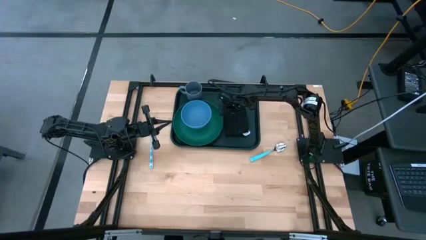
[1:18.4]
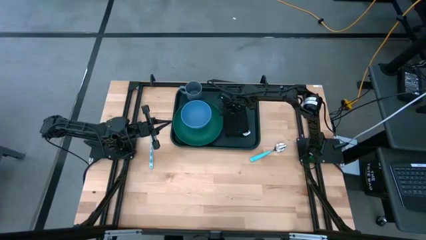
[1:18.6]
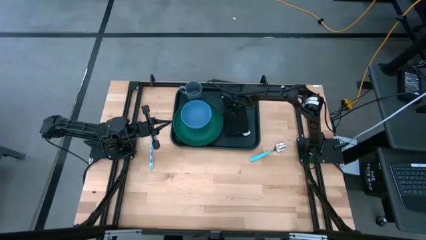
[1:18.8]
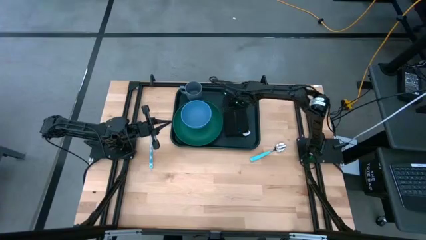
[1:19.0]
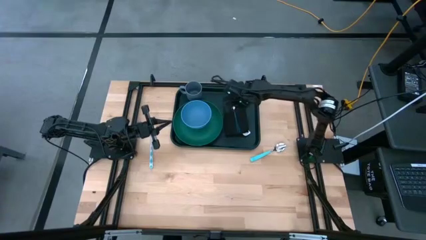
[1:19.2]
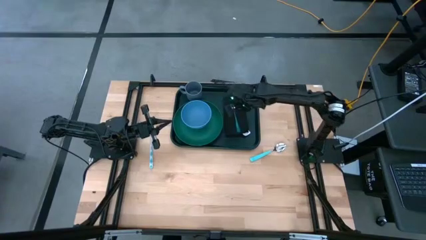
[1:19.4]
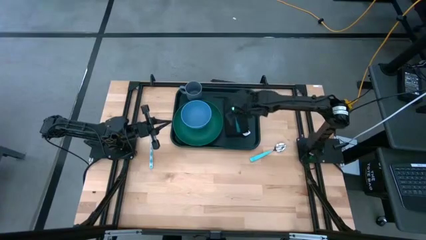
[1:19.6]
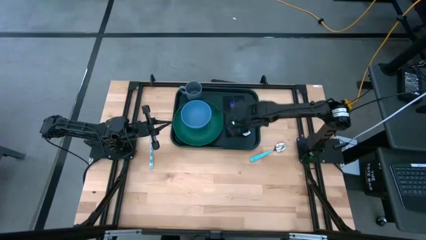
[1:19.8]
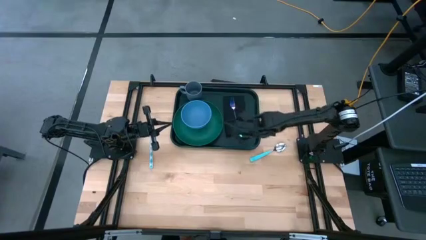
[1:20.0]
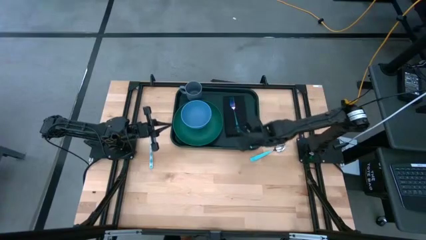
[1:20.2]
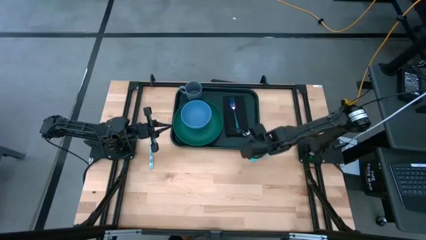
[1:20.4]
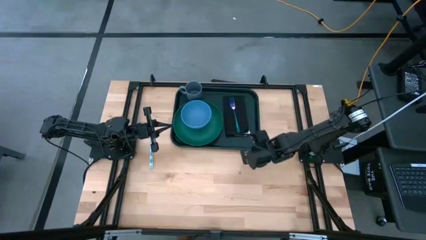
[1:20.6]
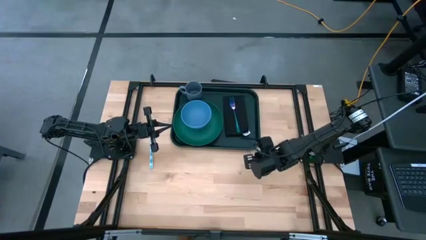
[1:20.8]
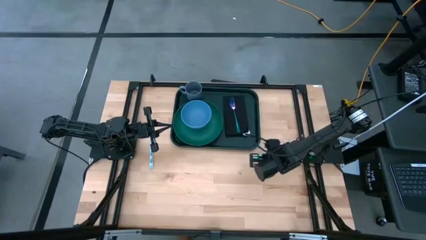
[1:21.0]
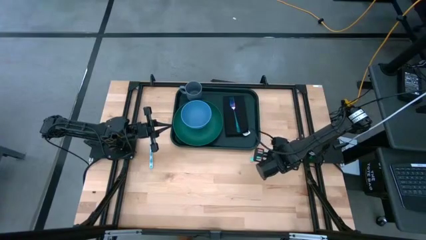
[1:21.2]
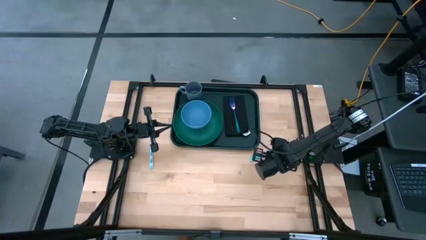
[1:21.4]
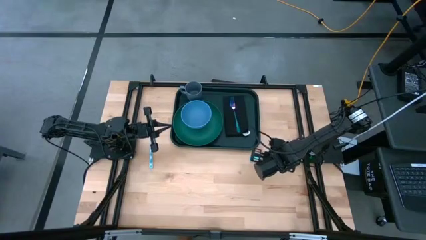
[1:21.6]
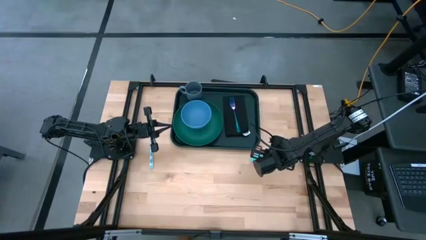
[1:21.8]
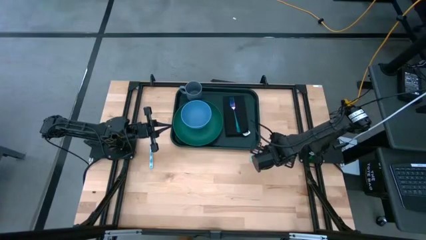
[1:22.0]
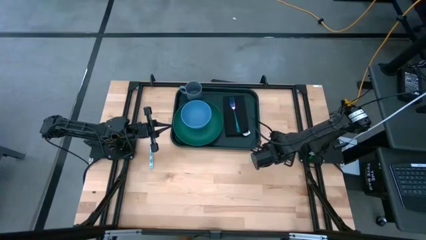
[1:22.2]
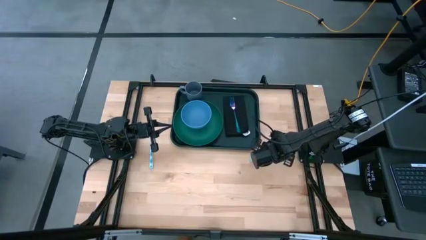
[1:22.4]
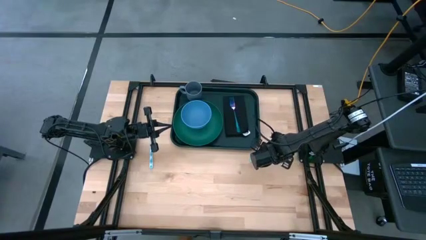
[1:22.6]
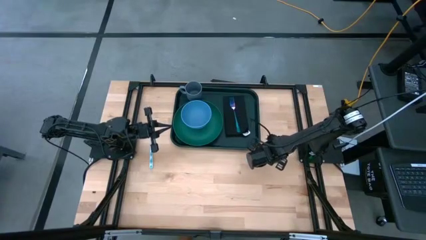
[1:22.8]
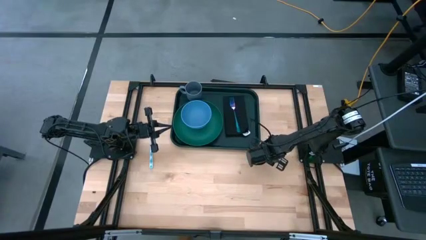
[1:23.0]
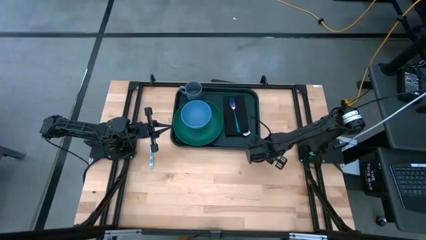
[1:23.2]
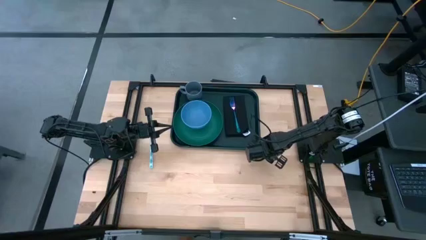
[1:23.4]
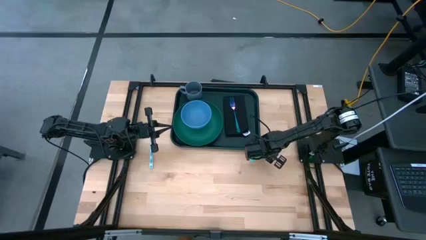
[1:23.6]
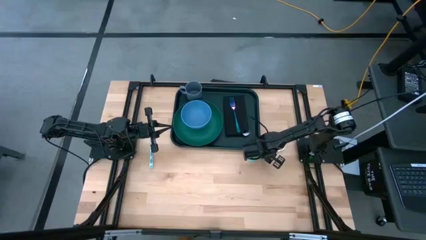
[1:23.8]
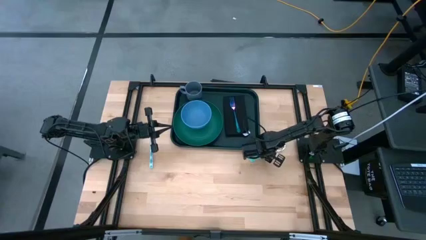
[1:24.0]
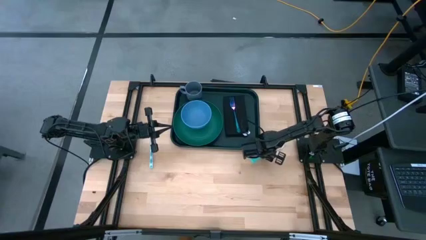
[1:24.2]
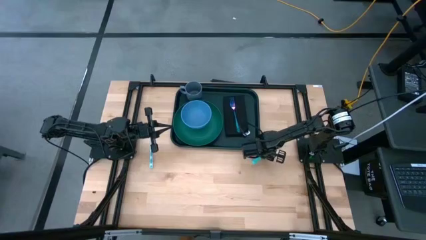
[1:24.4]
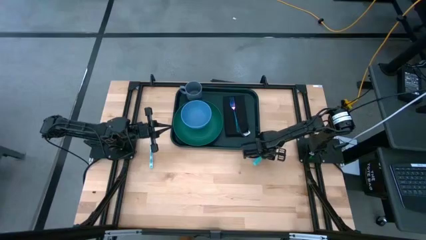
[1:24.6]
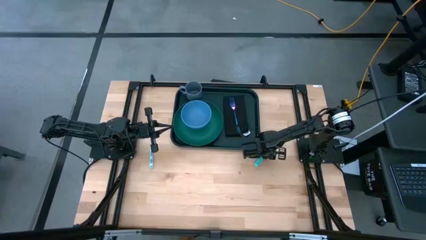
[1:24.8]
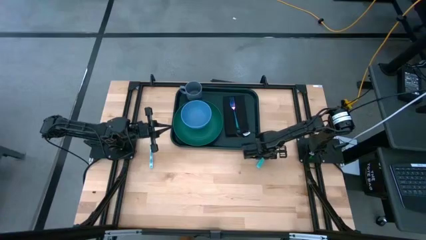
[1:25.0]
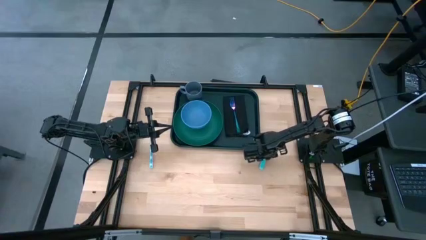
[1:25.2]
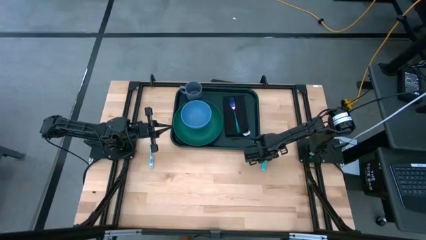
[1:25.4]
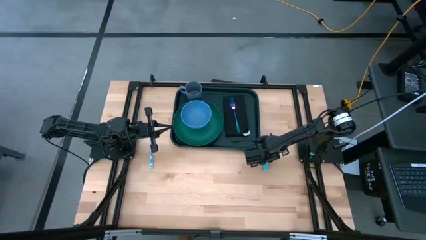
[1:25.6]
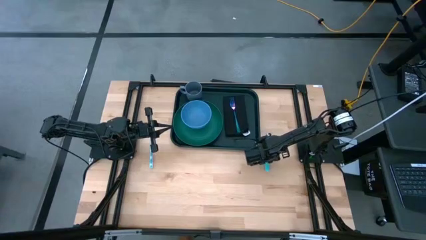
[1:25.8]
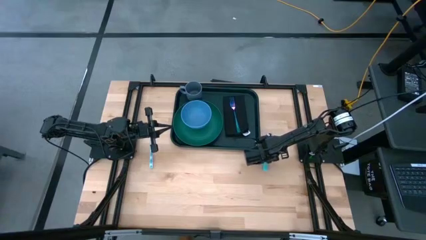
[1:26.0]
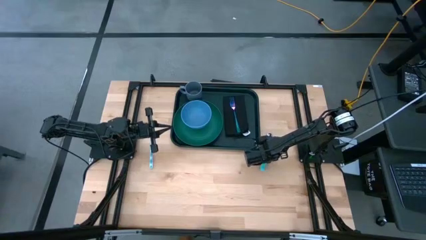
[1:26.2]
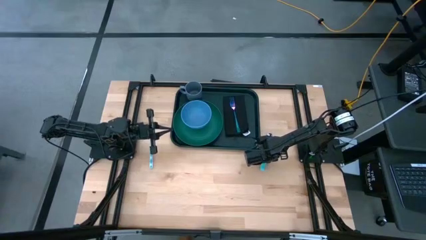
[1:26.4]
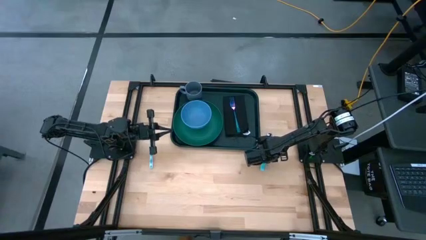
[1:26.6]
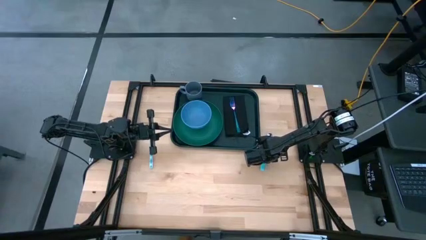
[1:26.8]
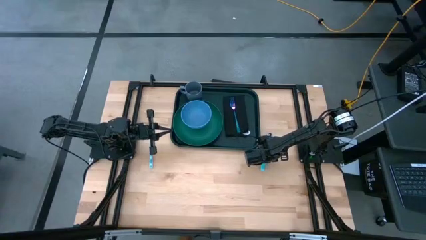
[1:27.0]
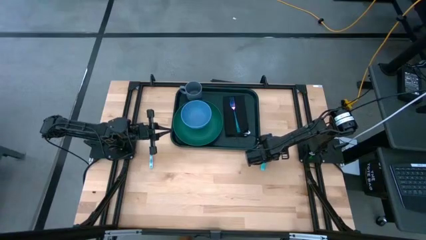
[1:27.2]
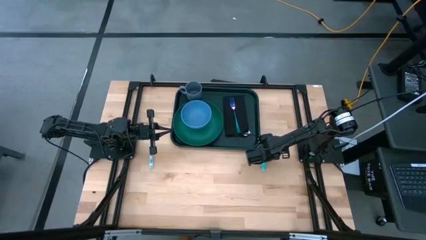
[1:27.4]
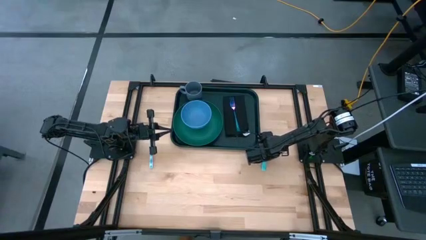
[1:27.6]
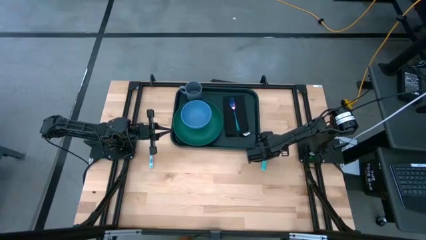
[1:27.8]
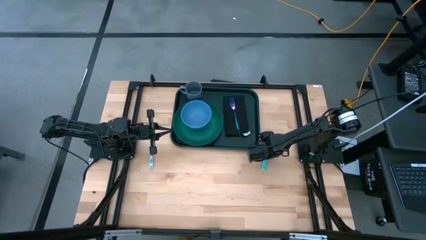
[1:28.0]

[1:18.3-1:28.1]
Task: Set up tray
Put the green spoon on top of the black napkin to the left of the purple fork

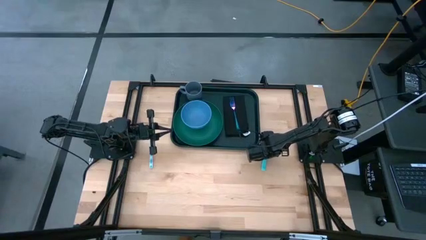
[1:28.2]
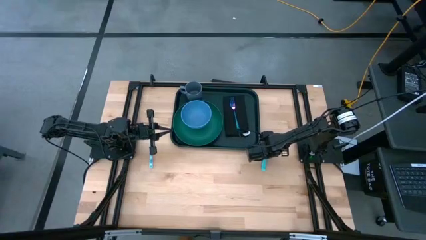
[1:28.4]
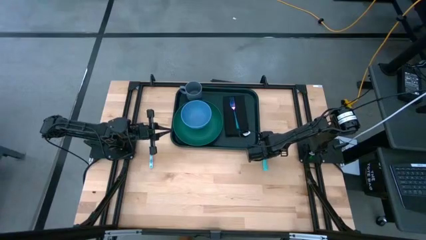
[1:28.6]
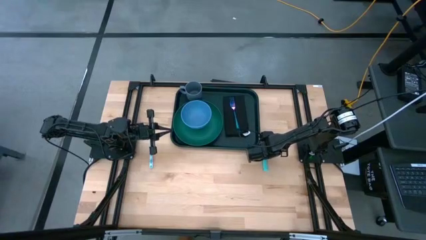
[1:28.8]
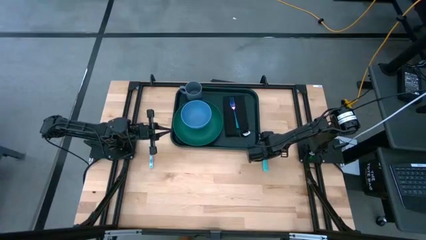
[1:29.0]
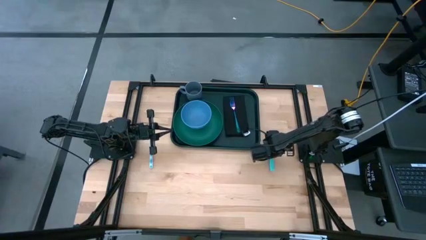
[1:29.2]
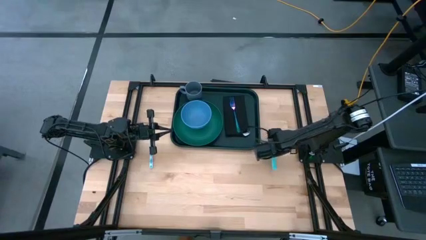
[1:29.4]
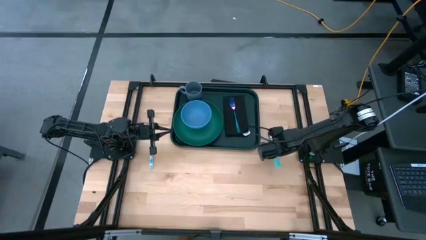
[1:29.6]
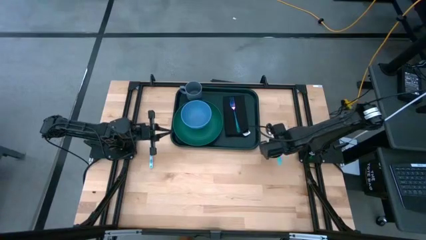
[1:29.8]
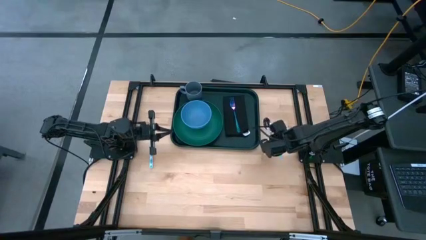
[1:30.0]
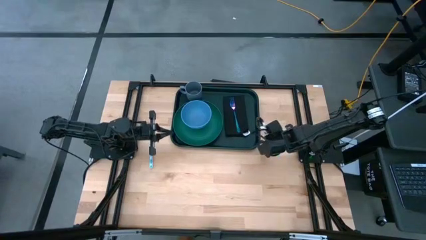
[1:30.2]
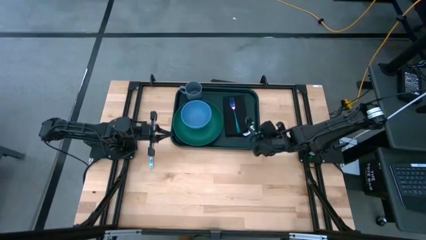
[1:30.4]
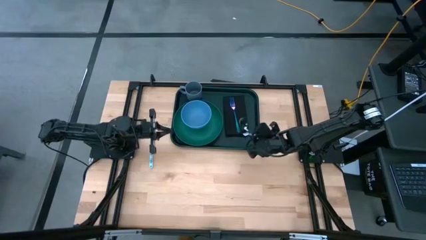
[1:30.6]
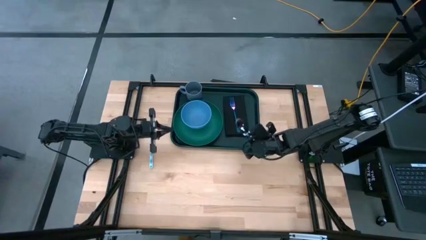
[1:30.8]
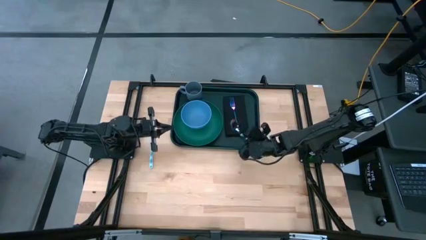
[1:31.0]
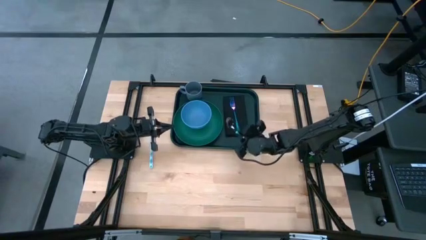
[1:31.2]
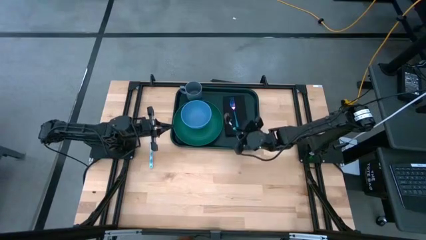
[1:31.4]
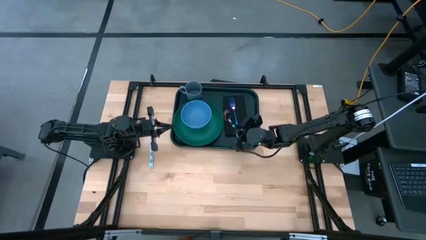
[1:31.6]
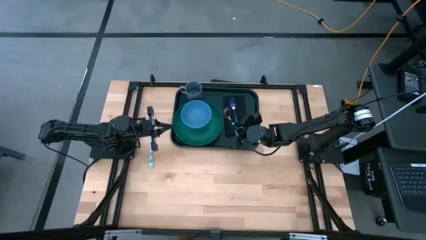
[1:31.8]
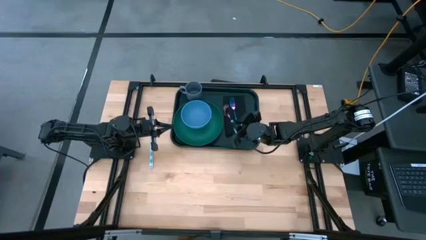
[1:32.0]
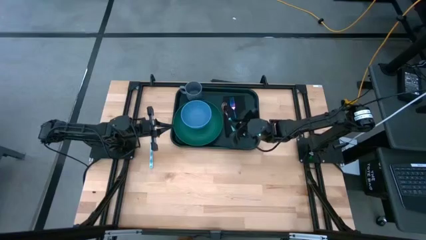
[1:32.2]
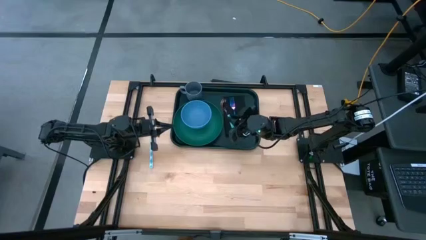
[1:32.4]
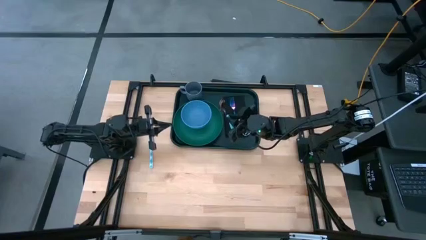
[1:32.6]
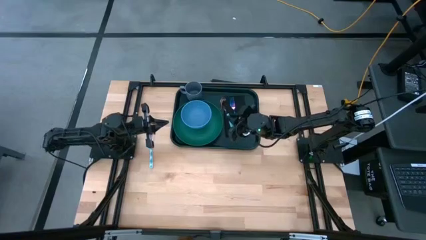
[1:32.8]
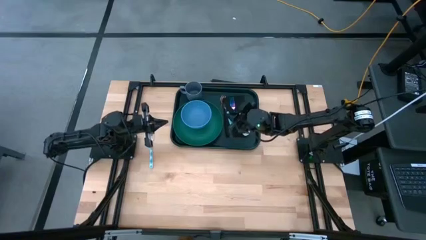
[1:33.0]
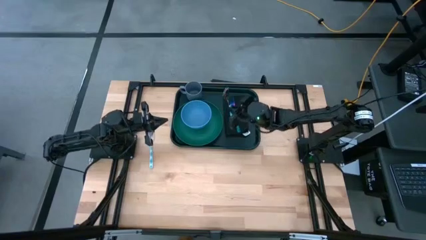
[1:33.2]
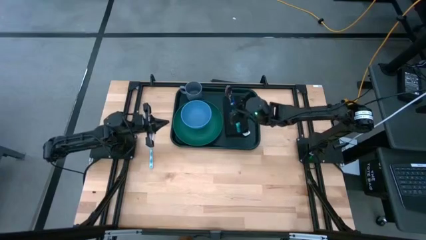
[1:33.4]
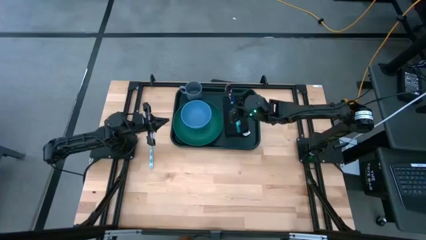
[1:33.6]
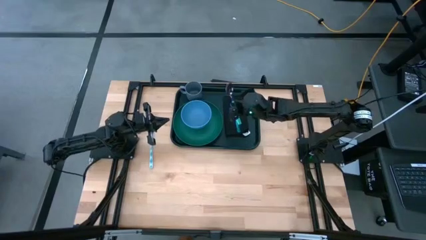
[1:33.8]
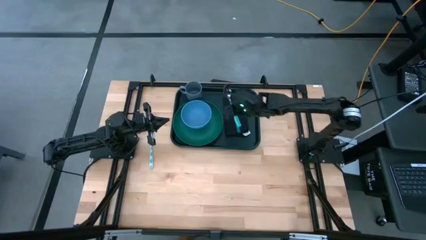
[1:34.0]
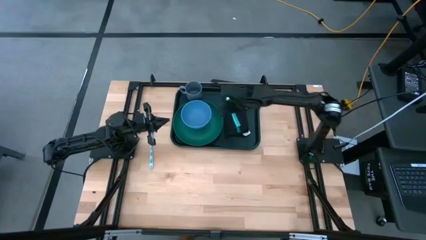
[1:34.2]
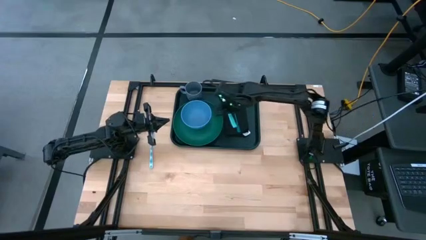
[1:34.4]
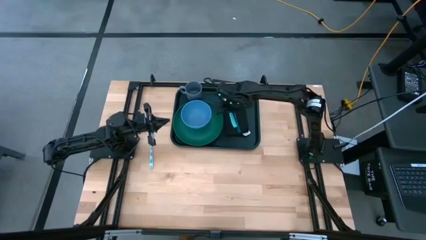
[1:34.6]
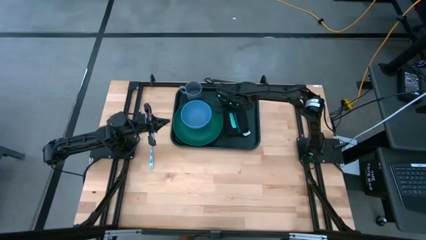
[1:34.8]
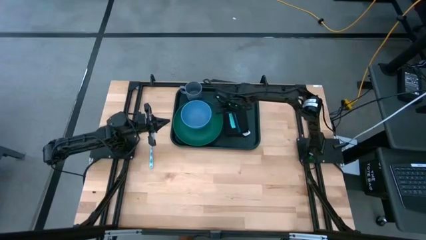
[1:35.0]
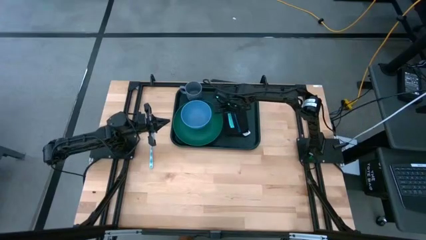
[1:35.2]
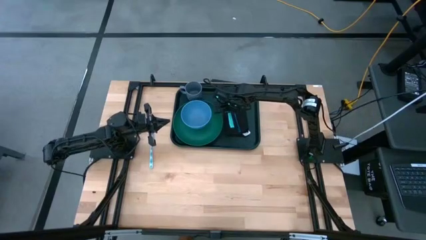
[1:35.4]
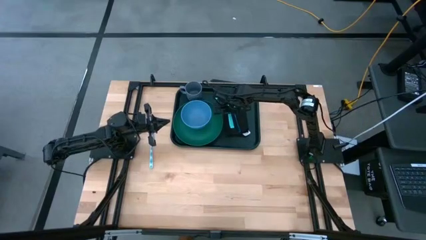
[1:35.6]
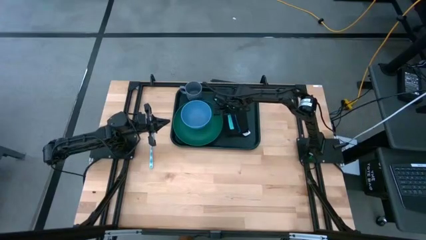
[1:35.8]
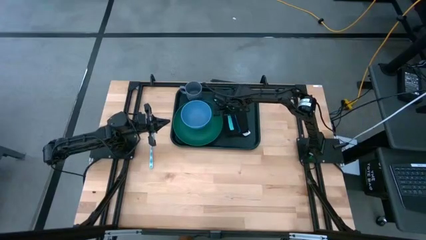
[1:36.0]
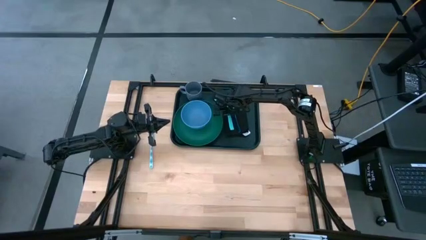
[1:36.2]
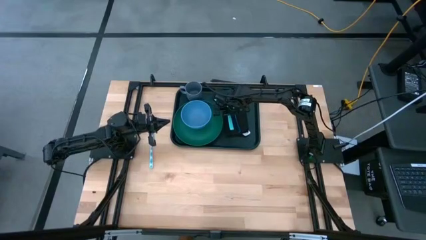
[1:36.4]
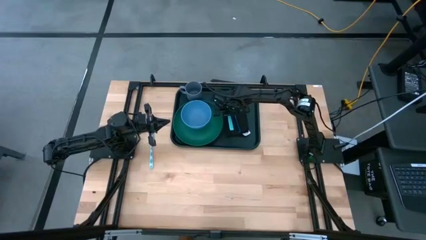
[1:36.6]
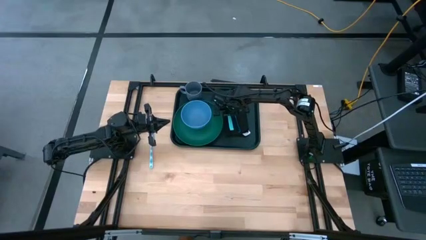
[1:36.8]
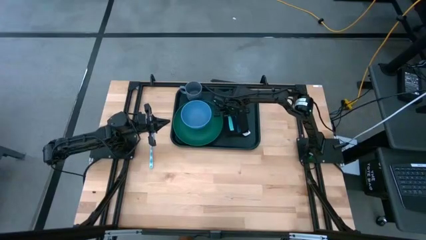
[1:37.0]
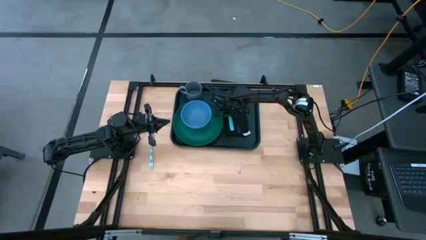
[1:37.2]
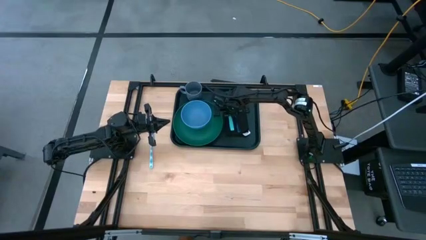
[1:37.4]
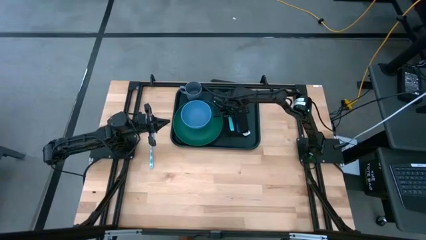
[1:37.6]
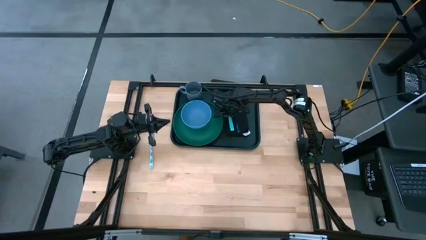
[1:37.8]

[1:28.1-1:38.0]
Put the green spoon on top of the black napkin to the left of the purple fork
